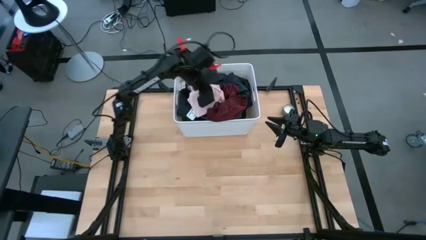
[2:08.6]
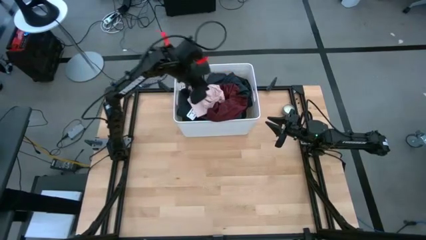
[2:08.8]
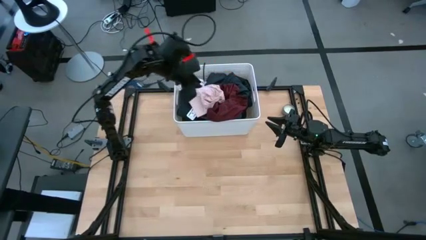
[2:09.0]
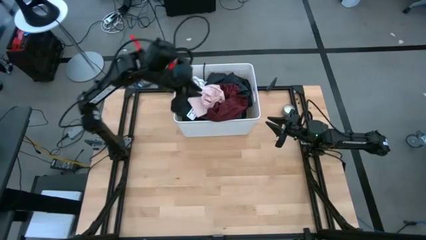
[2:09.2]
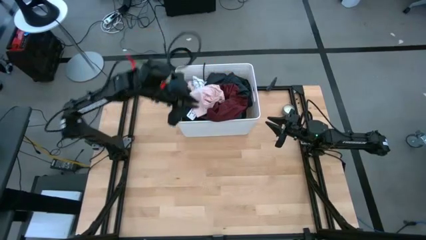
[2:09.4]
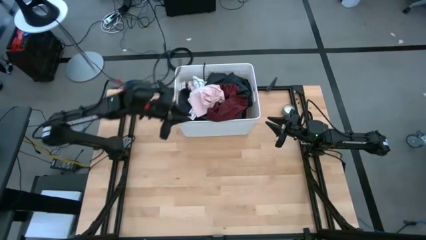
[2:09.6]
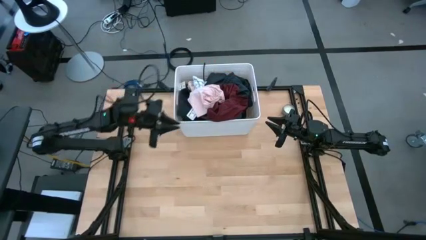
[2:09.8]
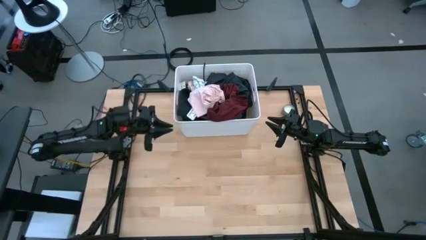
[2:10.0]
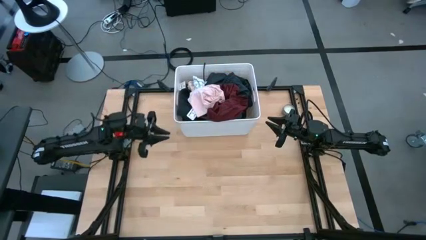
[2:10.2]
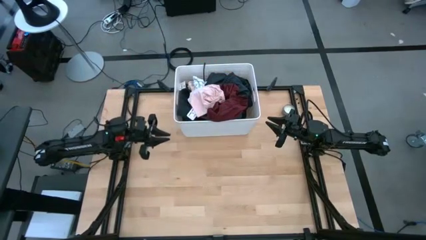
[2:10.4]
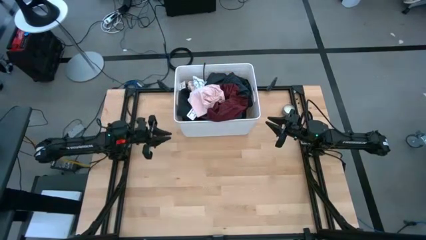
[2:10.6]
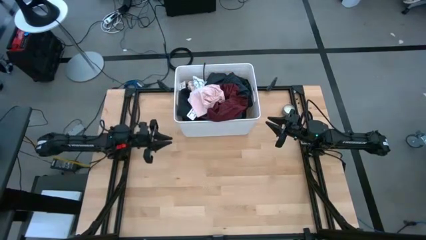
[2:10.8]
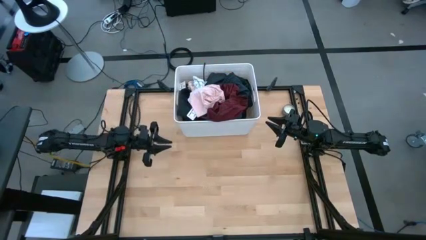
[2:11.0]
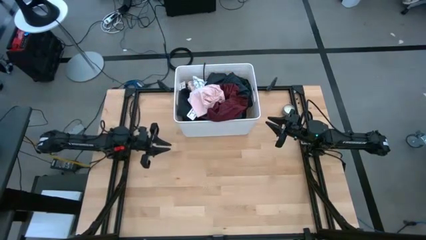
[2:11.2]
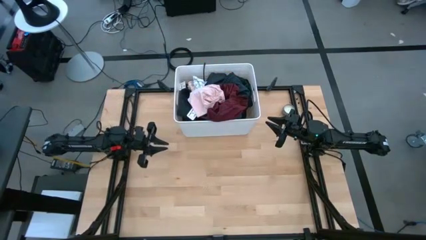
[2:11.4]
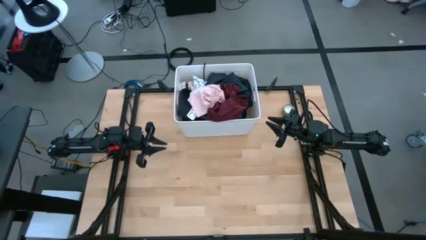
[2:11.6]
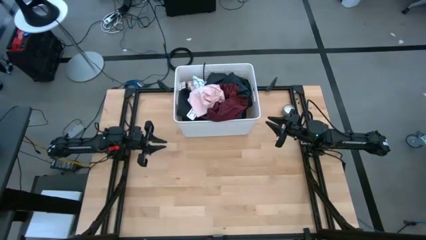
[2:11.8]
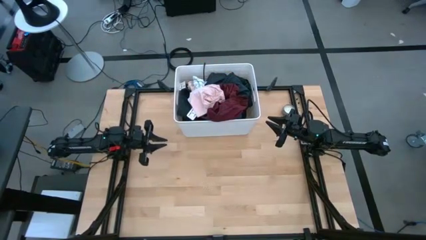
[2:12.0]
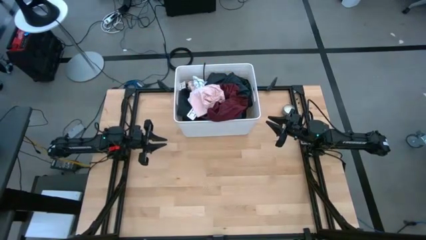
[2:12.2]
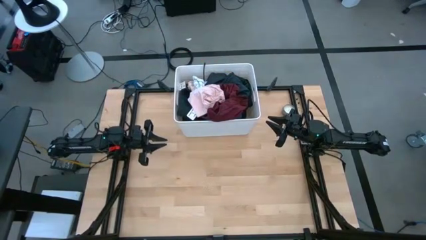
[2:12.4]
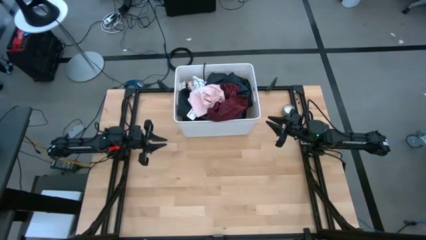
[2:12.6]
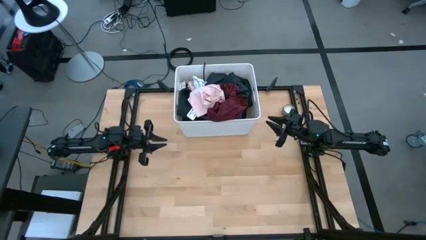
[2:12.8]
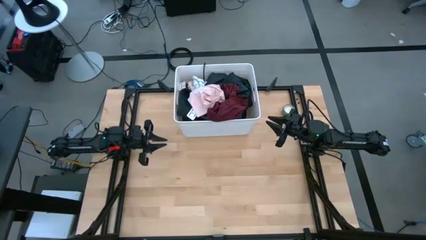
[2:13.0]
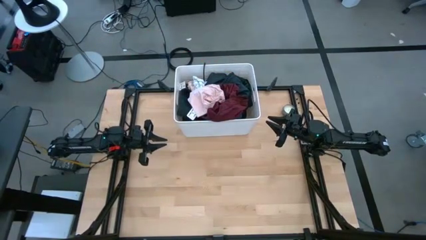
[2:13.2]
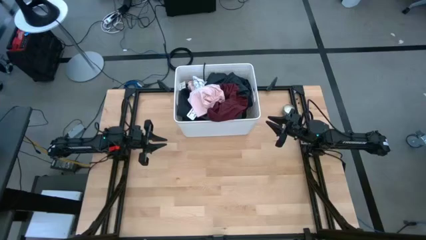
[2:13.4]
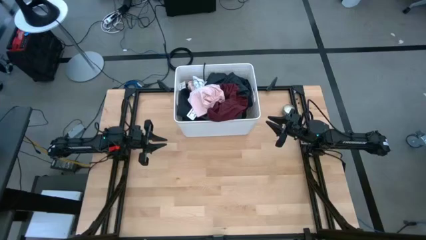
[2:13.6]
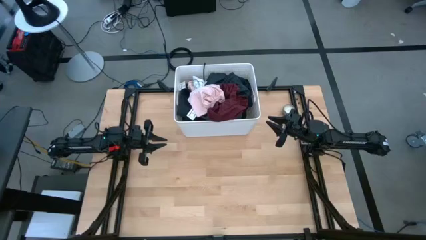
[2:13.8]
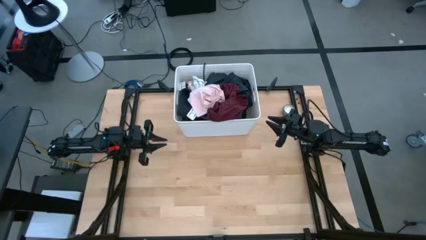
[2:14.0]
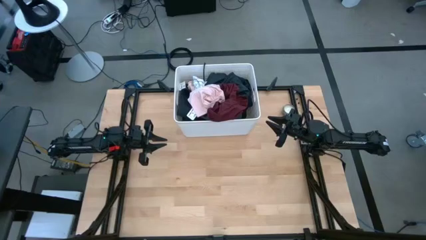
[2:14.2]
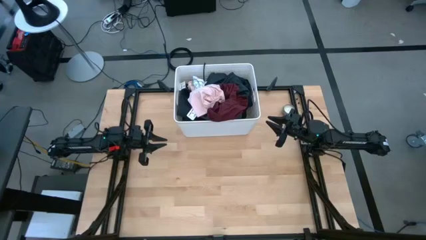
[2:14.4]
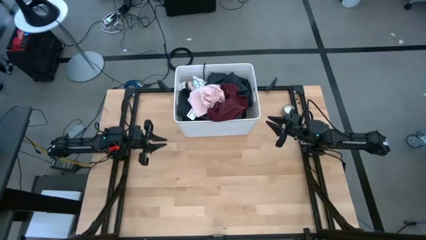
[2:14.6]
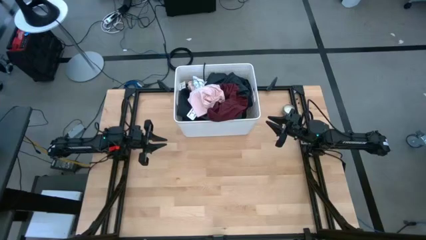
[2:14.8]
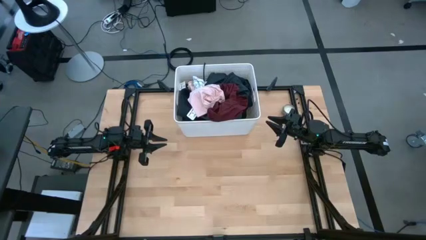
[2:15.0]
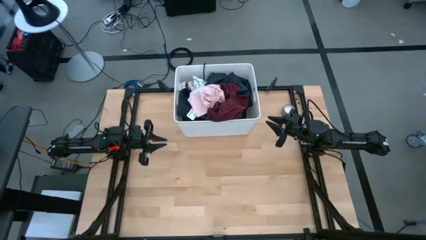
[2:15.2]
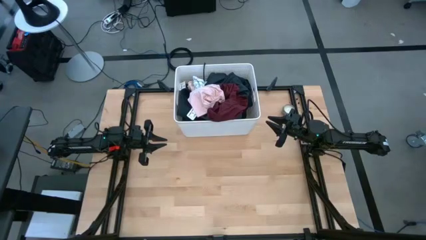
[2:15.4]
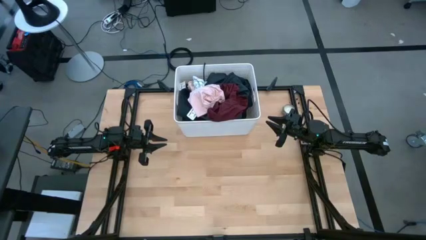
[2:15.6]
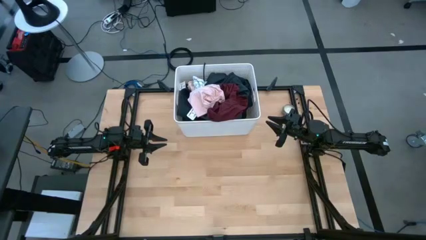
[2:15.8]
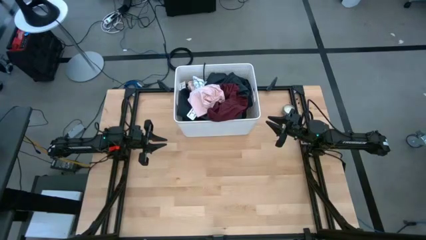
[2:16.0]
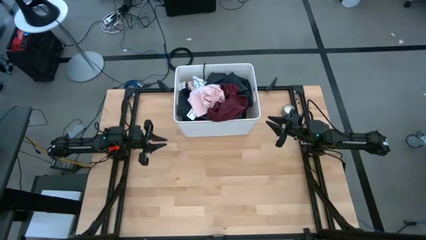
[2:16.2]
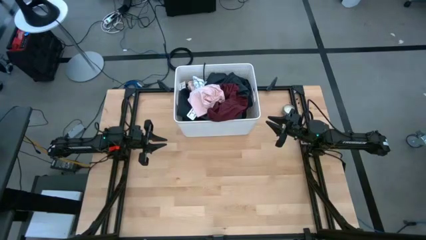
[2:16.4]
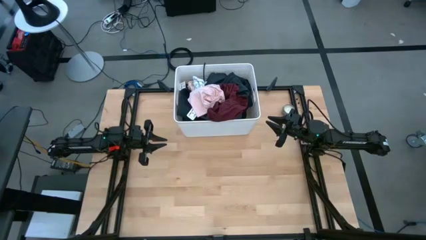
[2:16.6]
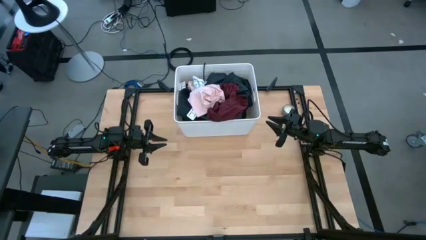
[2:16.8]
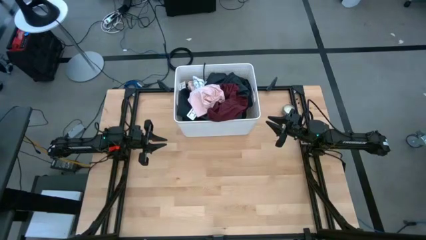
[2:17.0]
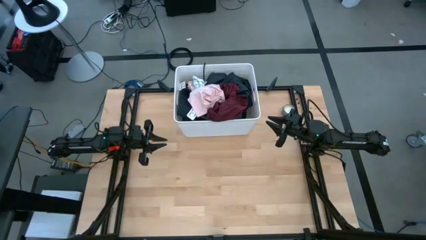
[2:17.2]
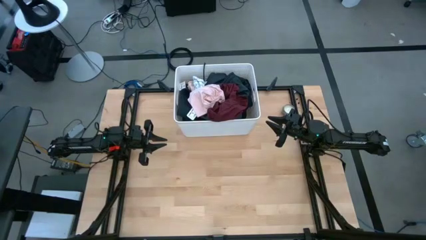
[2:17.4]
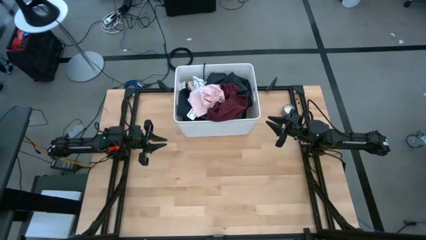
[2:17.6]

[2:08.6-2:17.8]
Task: Sort clothes
Return to Home Position

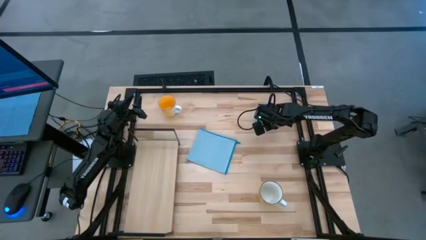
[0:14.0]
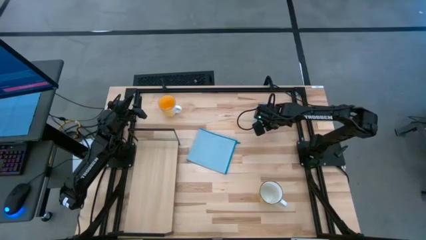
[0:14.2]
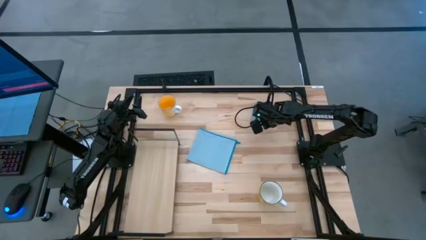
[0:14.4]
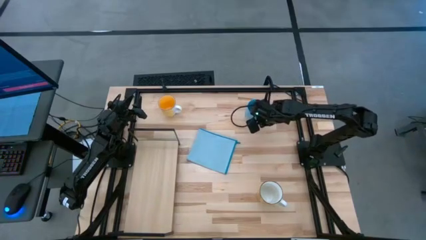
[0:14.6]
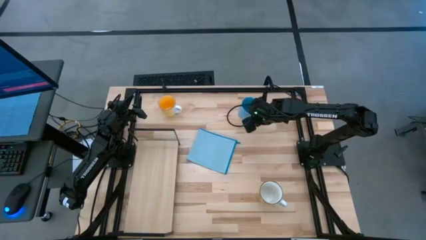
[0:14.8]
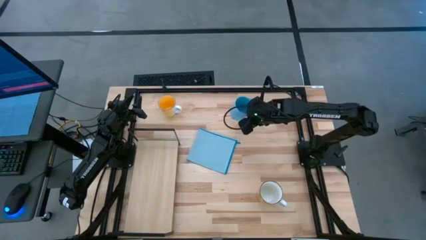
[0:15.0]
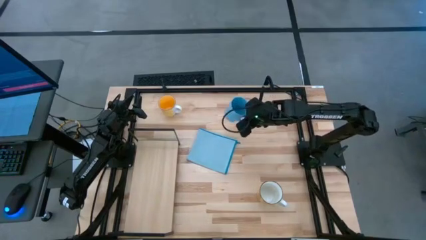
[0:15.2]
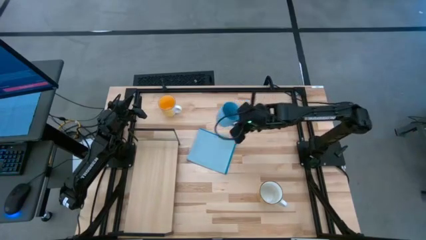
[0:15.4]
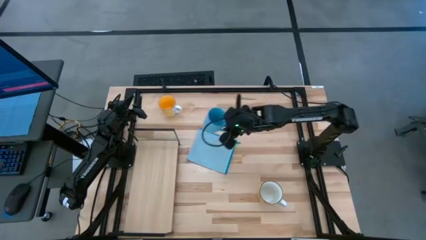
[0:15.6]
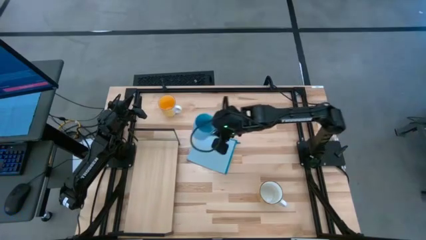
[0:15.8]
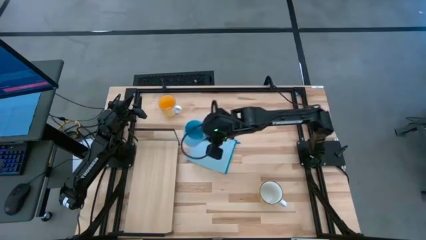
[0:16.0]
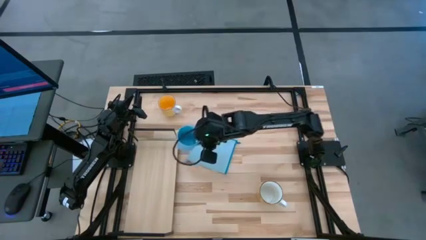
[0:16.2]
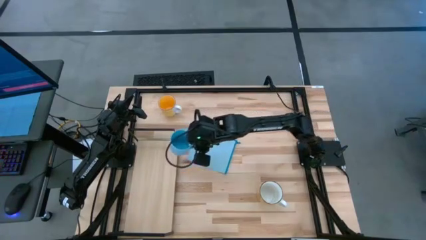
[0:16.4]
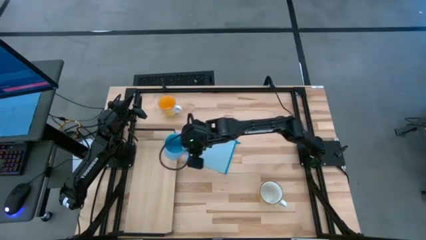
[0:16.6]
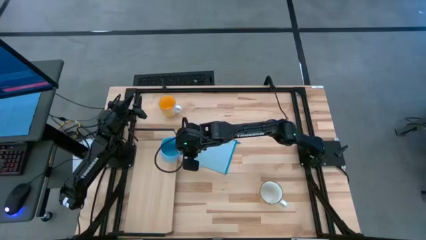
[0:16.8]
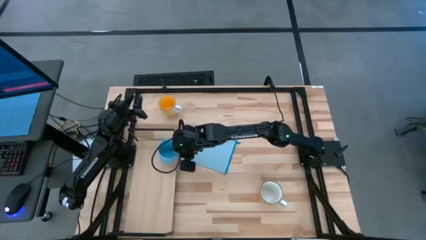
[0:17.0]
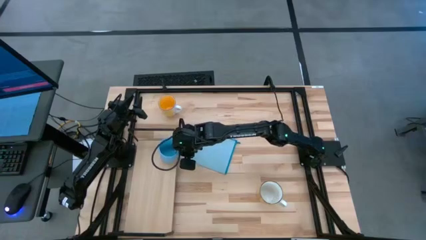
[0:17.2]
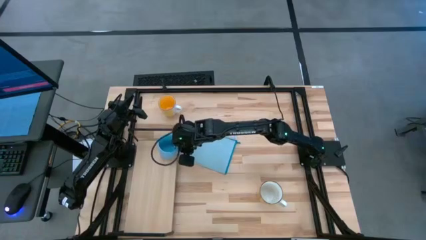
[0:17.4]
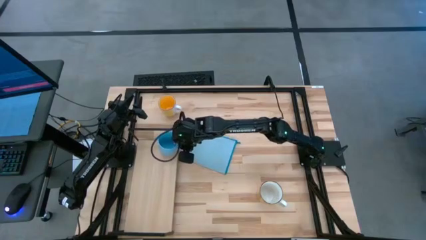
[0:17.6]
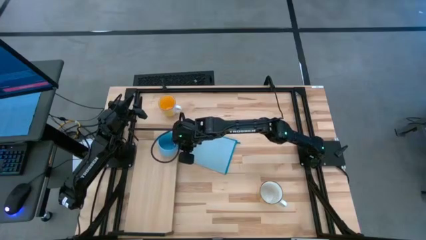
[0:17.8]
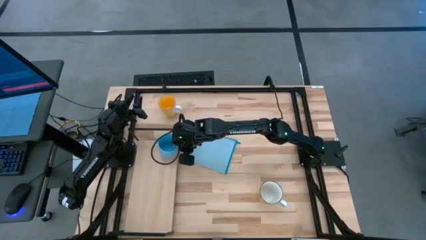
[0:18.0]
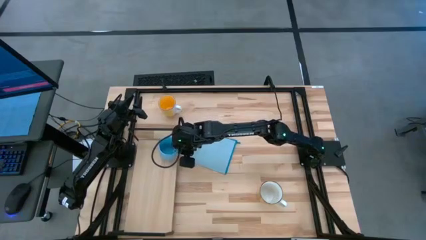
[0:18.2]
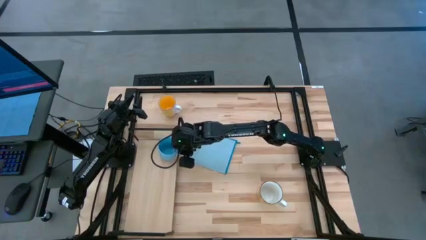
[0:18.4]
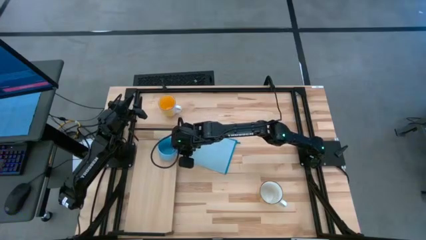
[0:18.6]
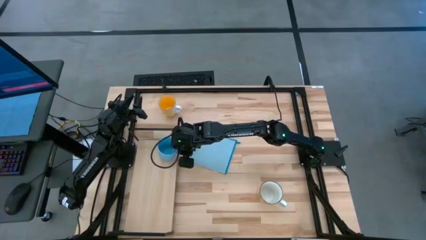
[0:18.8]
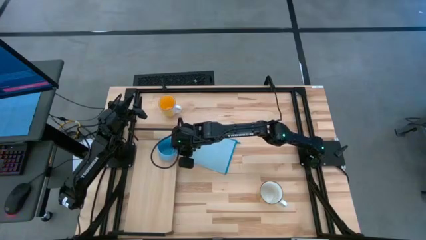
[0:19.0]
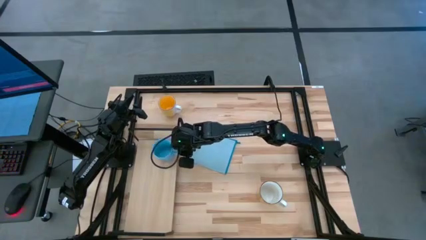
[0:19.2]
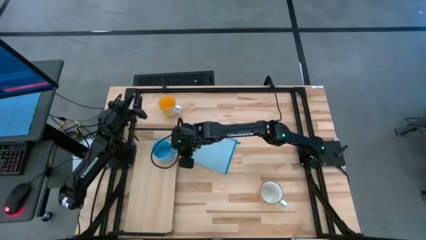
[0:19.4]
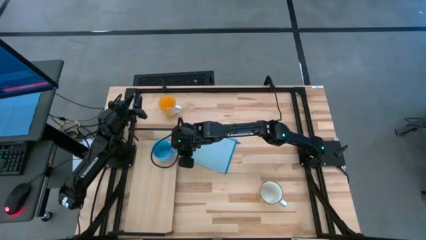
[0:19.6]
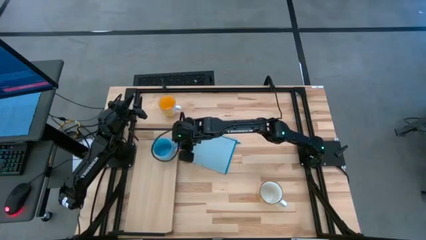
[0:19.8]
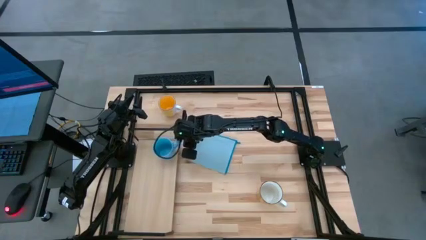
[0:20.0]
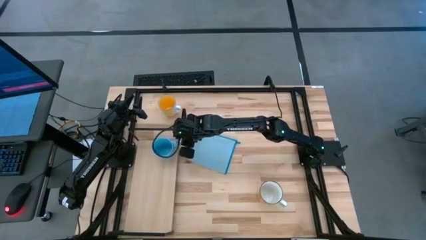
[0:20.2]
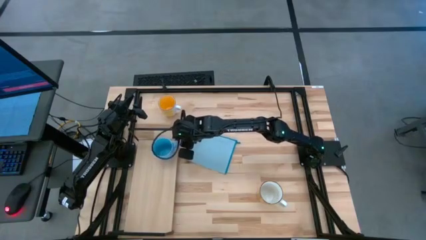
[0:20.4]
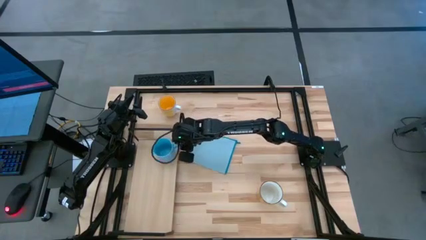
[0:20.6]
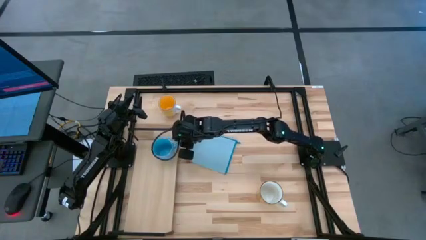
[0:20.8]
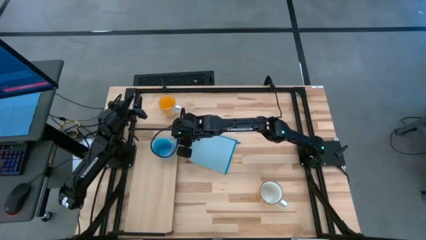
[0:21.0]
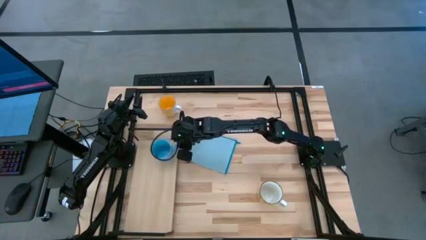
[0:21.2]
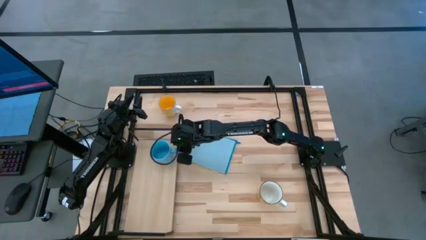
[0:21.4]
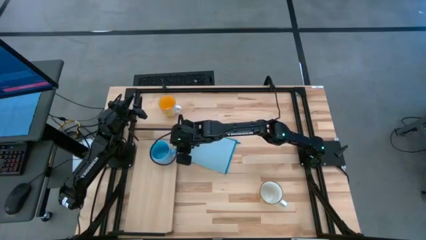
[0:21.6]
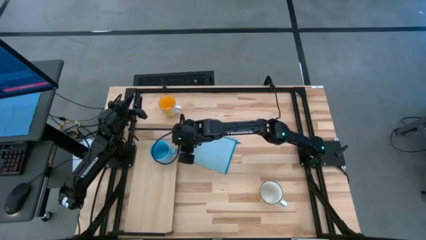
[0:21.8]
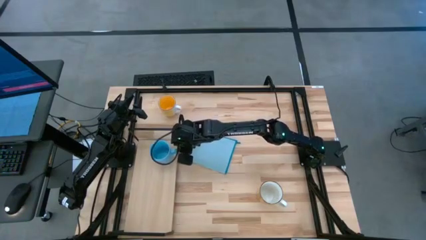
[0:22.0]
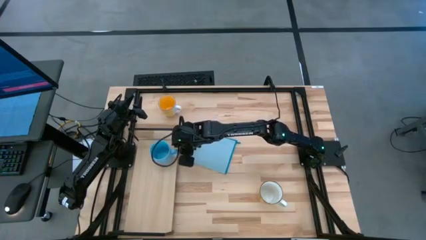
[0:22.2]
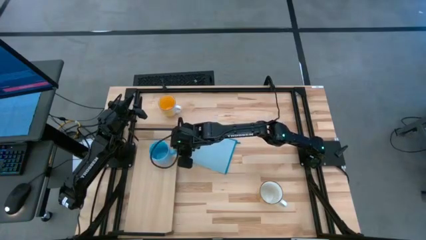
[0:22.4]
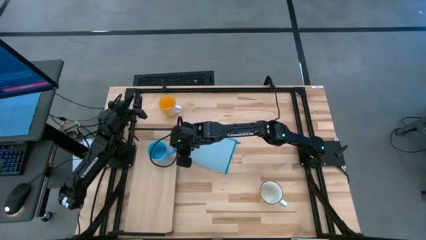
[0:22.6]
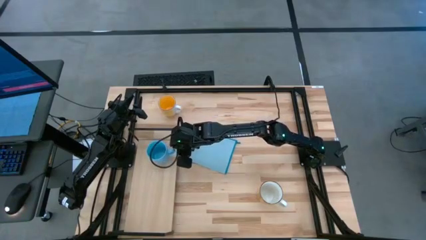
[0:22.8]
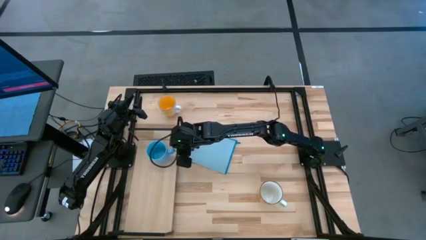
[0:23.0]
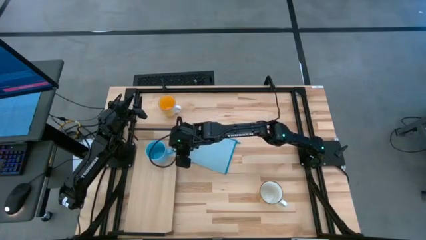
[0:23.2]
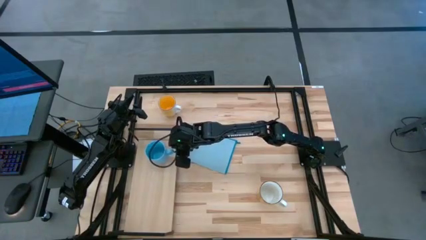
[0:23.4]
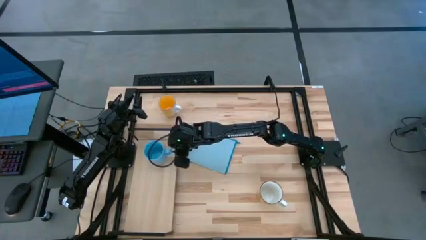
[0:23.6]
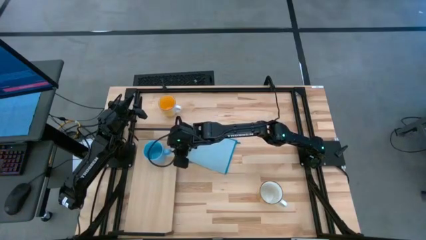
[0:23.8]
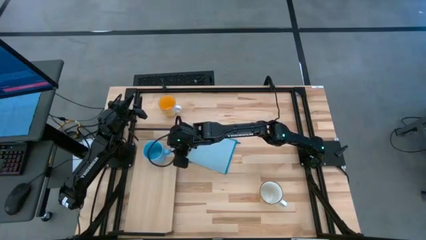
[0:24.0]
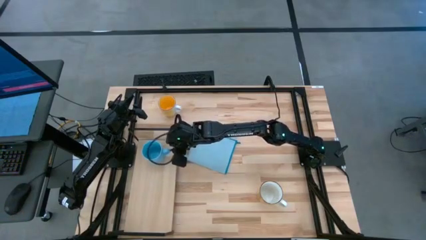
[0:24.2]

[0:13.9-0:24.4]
Task: Stack small to large cups/mugs on shelf
Put the blue mug on the shelf
